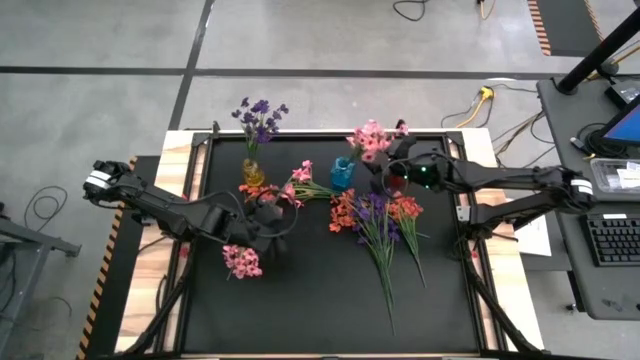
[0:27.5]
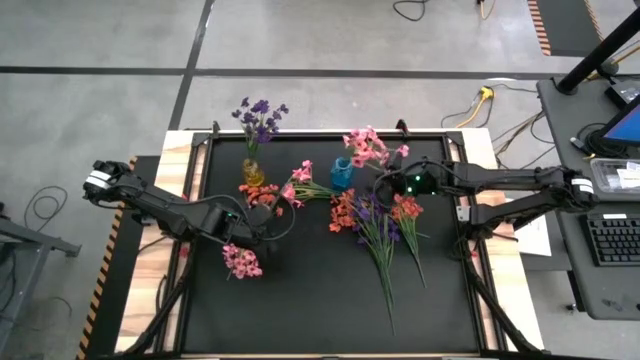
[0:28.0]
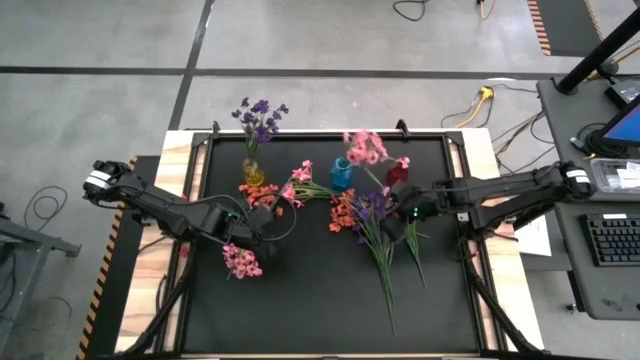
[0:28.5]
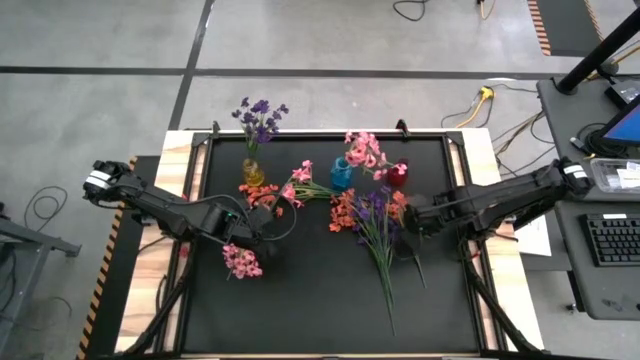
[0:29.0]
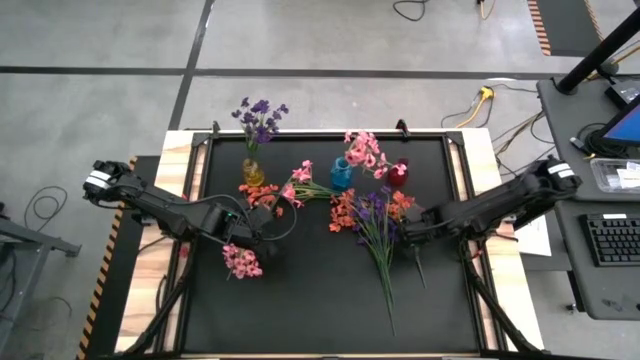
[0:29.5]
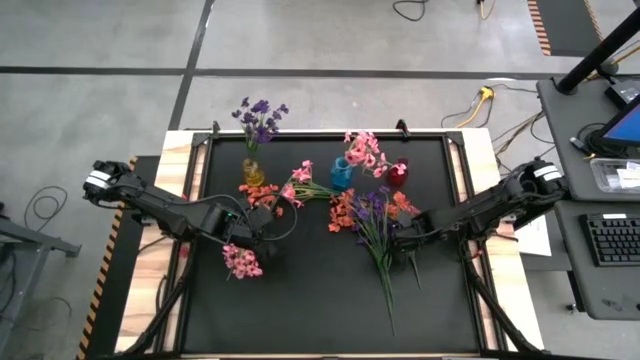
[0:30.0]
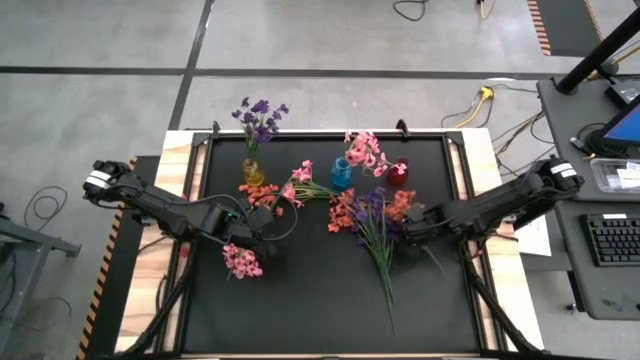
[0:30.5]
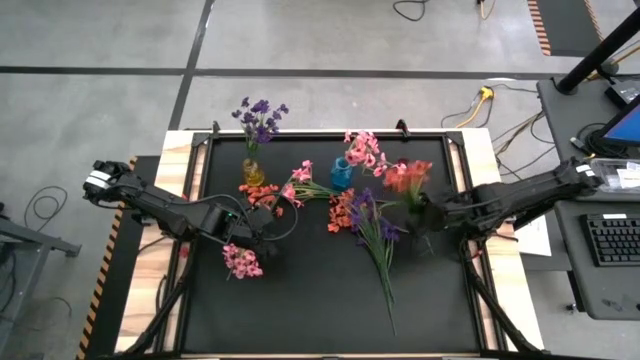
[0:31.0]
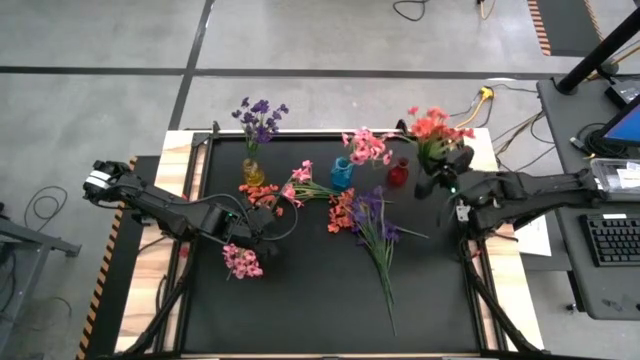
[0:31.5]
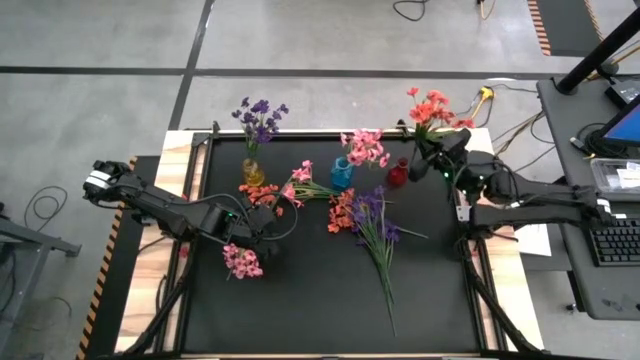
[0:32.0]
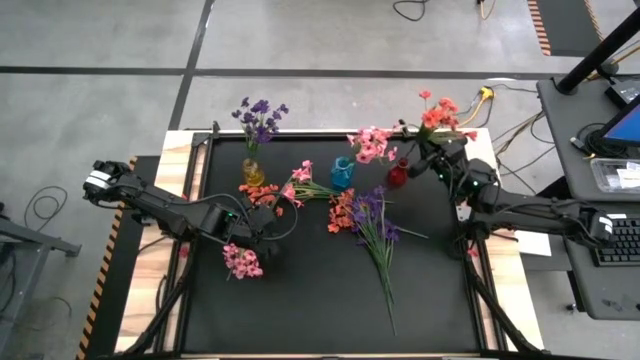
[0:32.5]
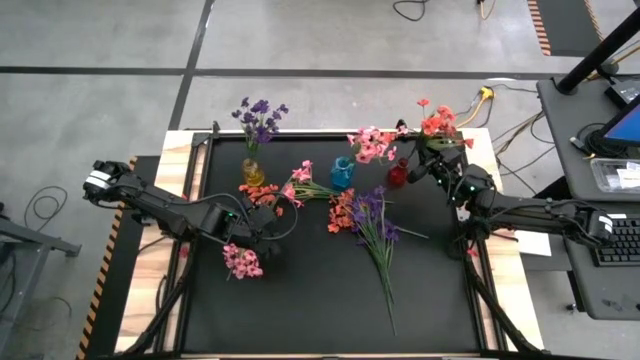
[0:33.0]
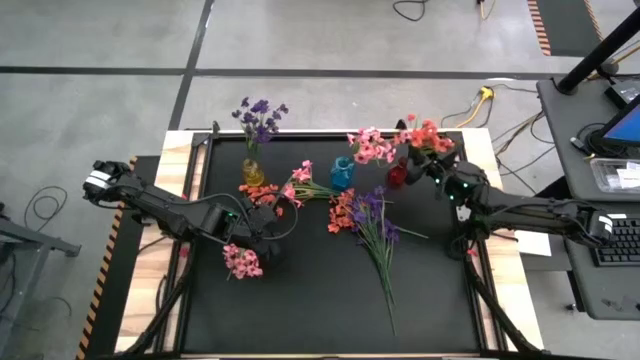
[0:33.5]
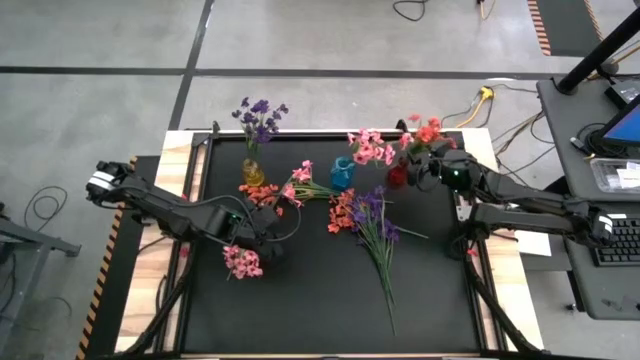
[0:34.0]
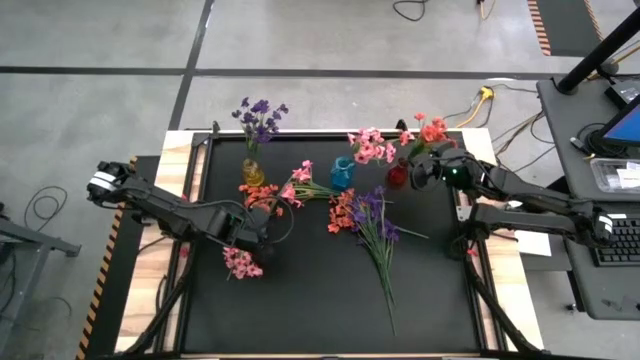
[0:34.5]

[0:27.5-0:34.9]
Task: Sort flowers into vase by color
Put the right orange flower into the red vase

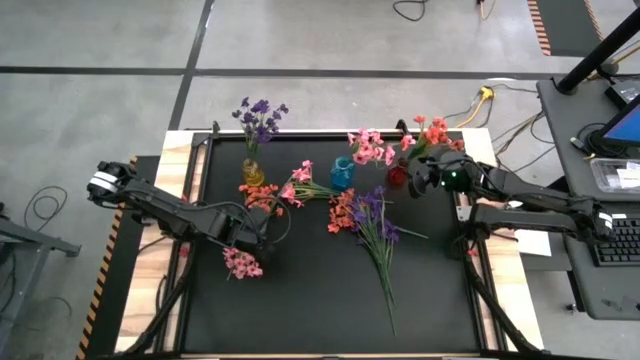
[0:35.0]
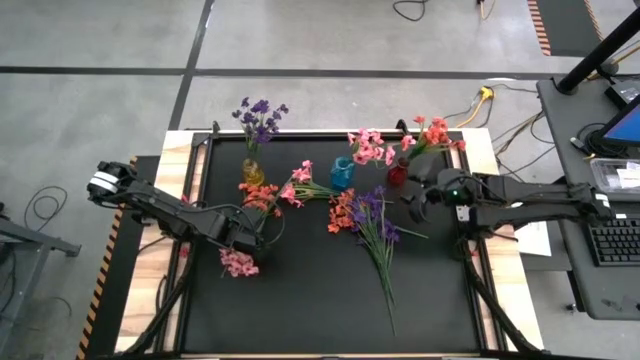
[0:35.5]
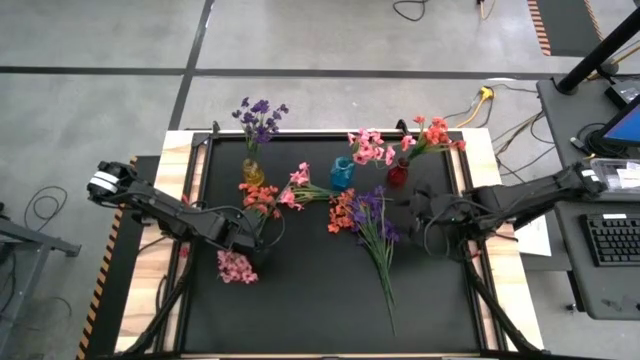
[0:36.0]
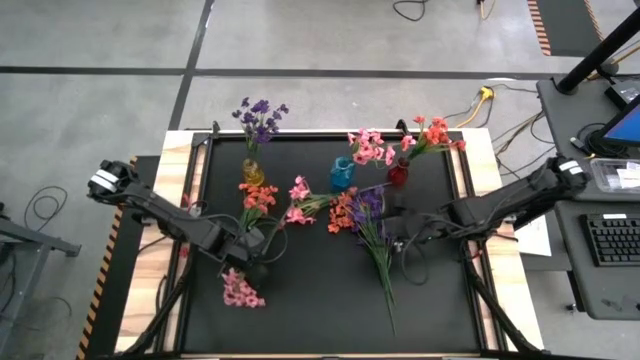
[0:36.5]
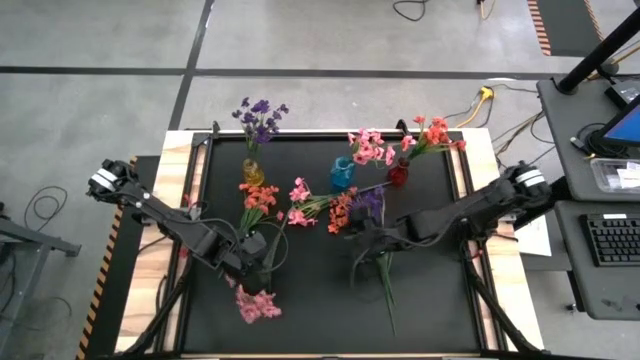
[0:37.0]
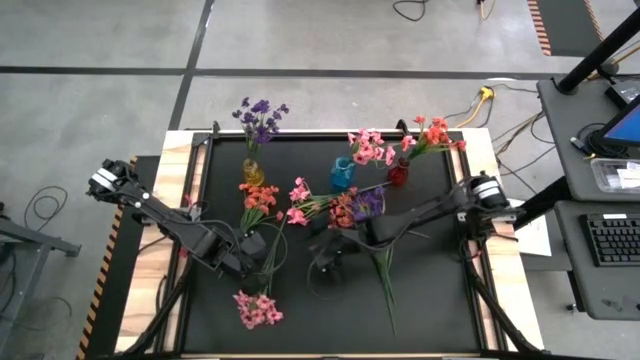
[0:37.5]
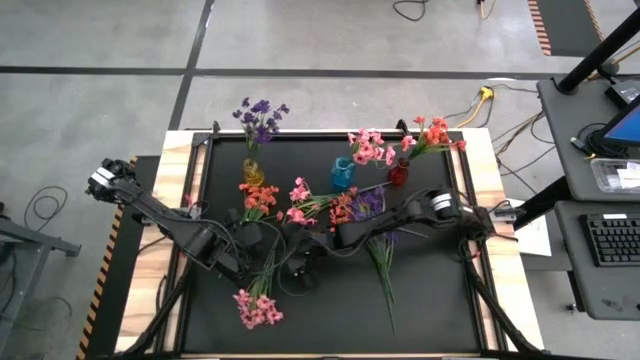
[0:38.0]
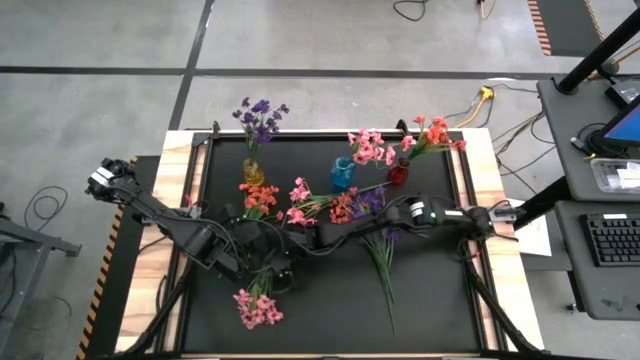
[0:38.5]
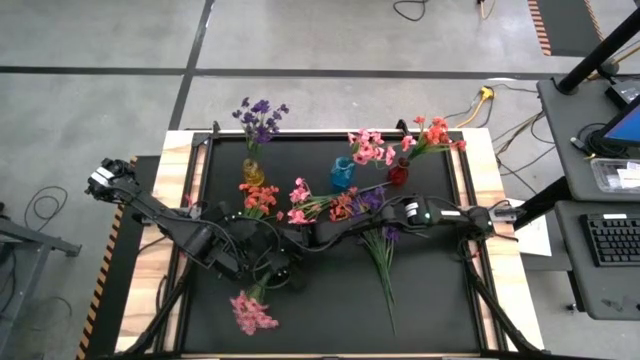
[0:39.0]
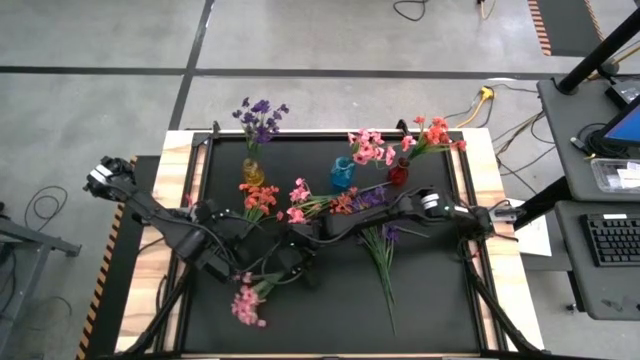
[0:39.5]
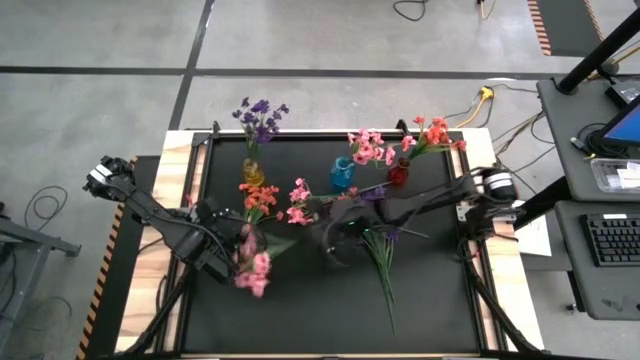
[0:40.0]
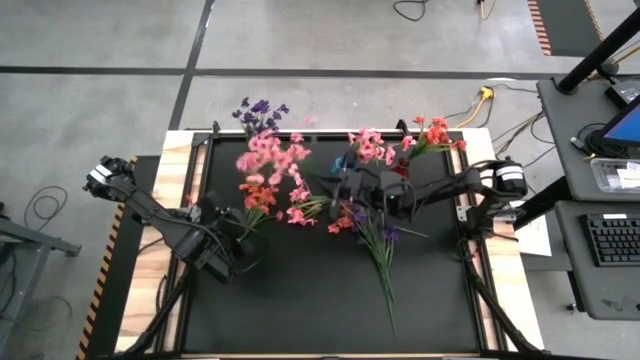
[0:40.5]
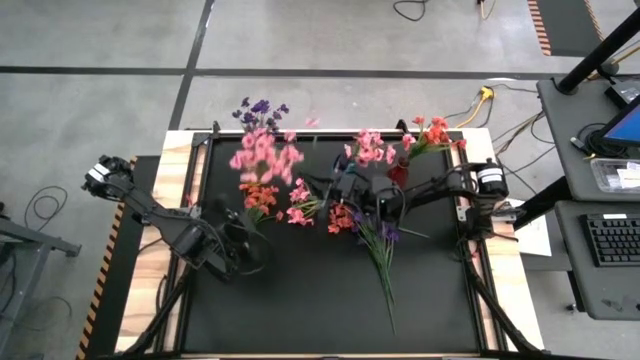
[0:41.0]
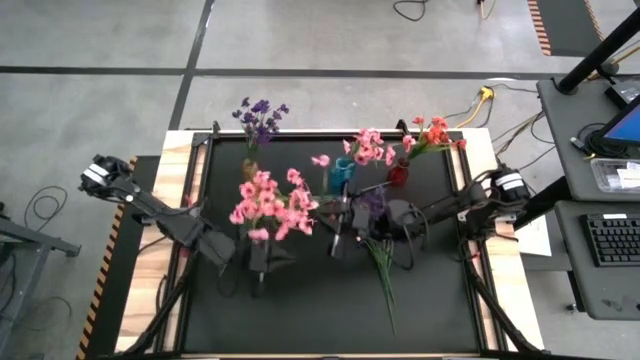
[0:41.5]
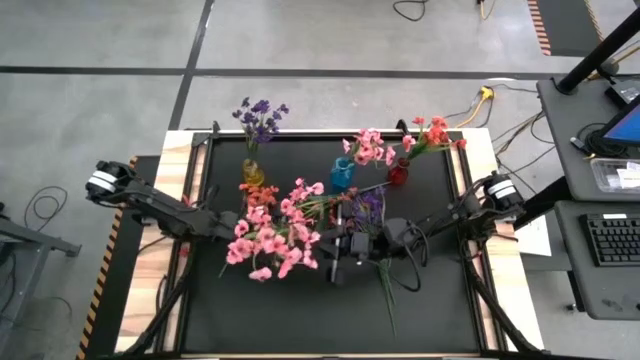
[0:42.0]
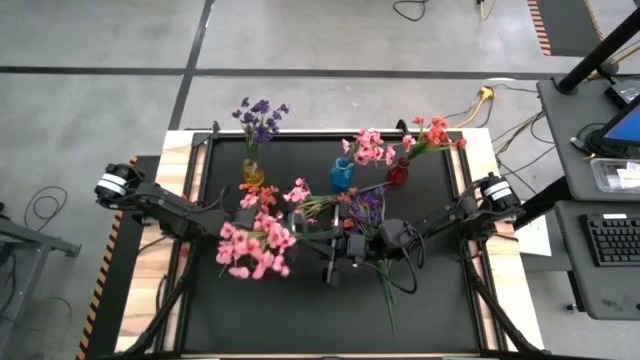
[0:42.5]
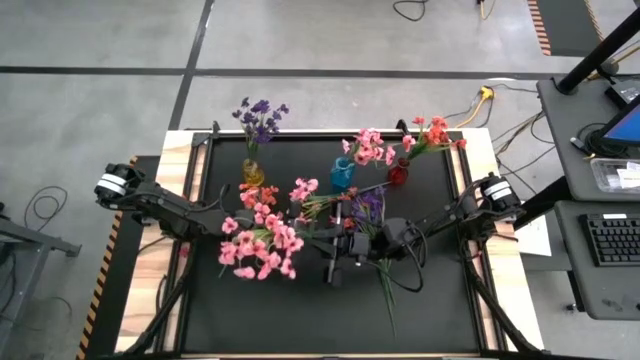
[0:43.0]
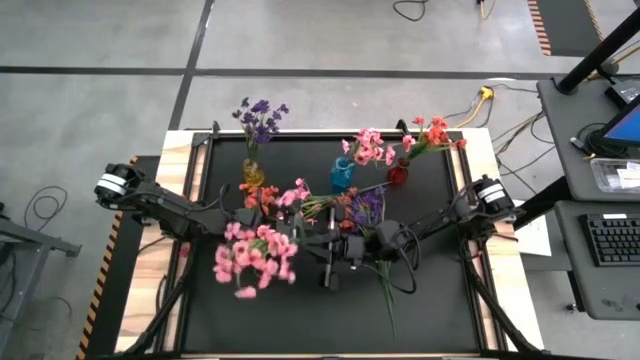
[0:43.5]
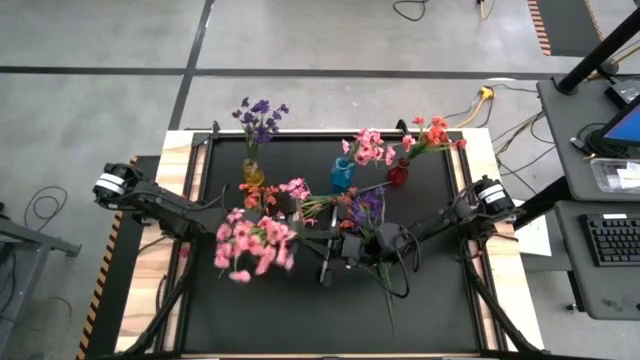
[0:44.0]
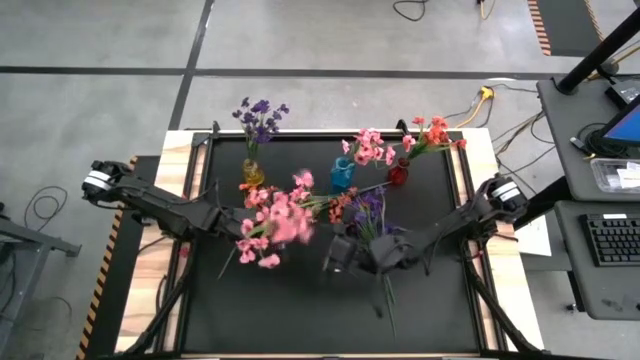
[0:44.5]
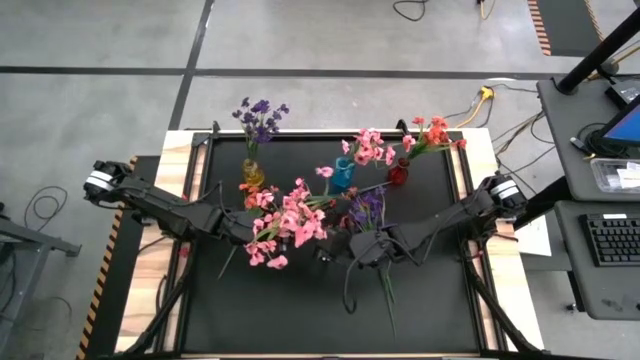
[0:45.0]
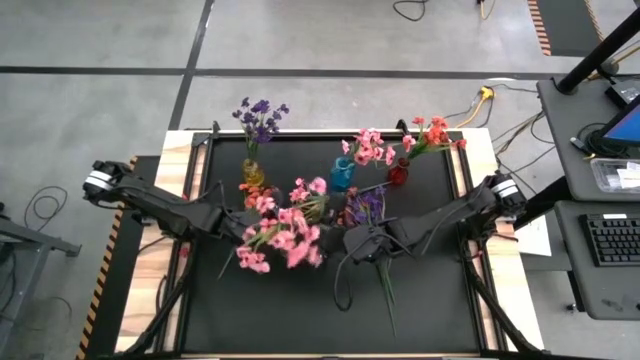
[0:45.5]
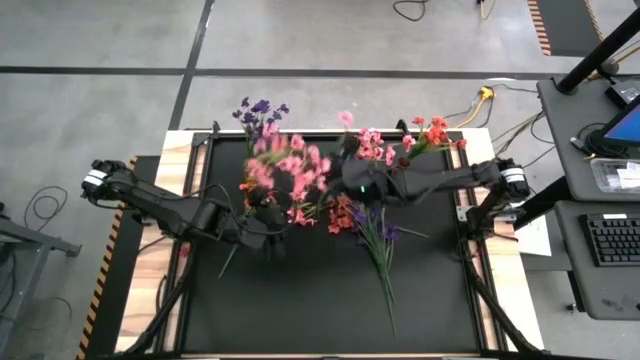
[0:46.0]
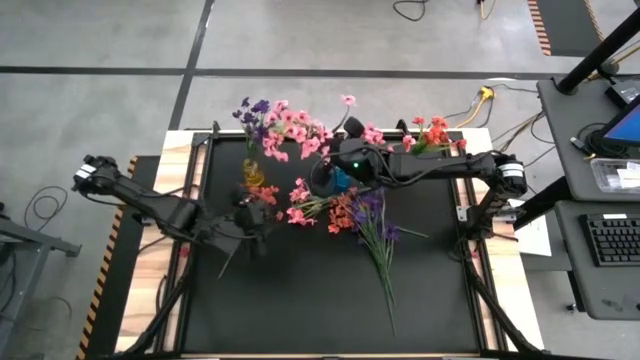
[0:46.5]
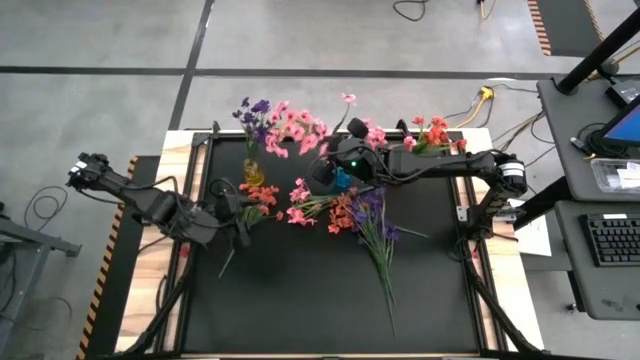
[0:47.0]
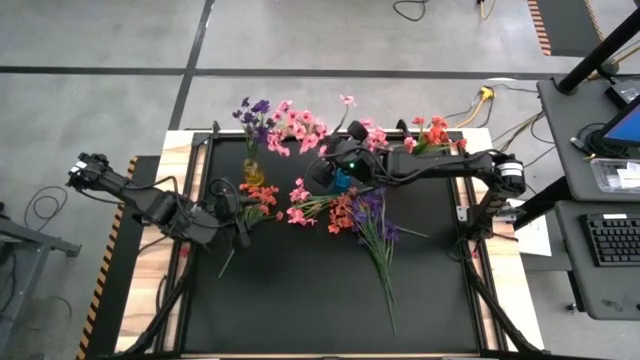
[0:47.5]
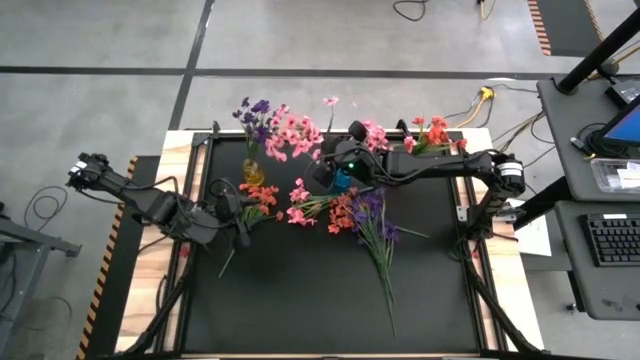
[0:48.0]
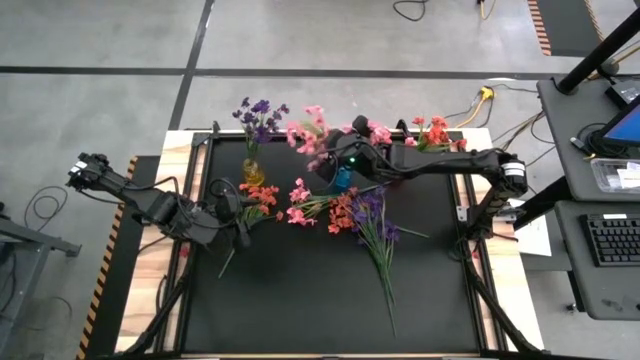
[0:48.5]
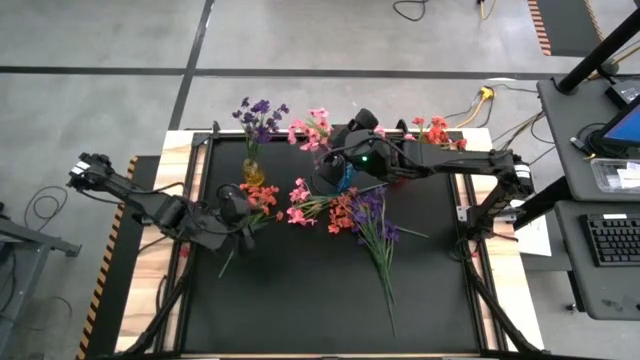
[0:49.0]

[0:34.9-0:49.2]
Put the bottom pink flower into the blue vase
